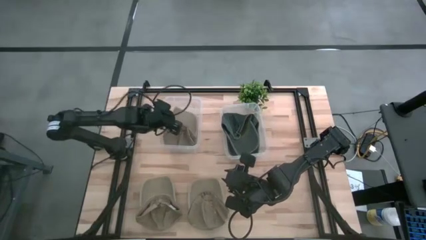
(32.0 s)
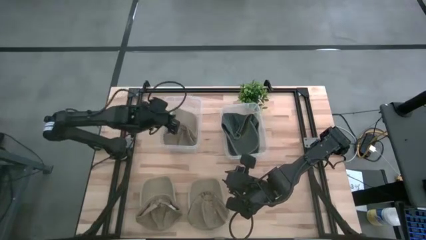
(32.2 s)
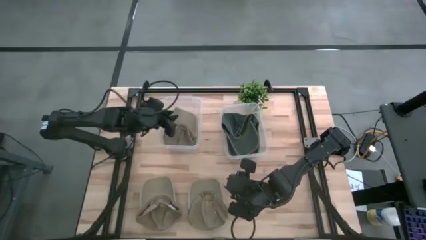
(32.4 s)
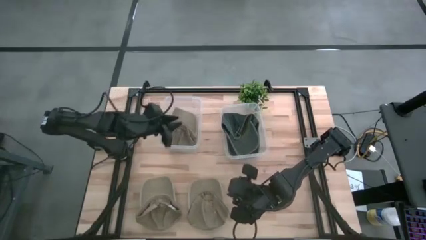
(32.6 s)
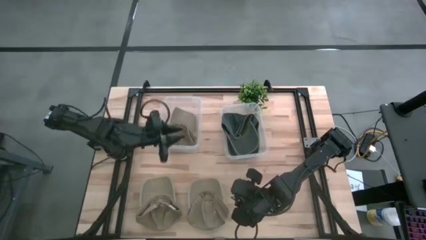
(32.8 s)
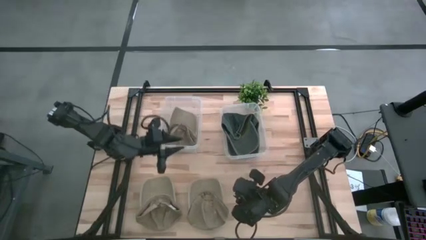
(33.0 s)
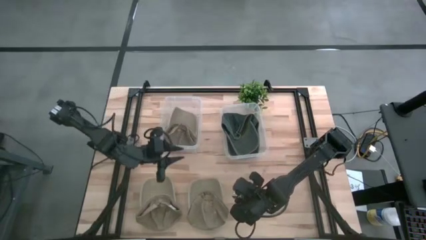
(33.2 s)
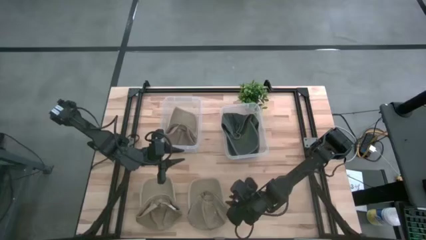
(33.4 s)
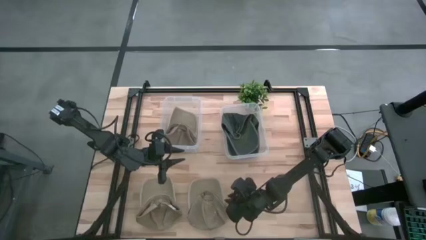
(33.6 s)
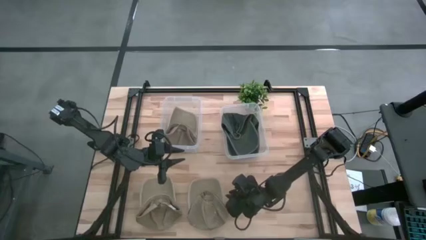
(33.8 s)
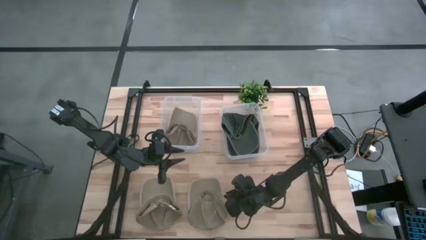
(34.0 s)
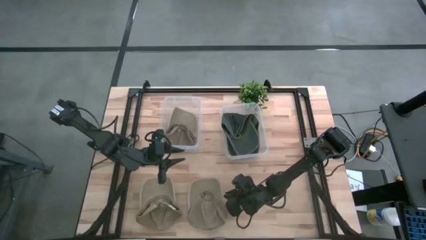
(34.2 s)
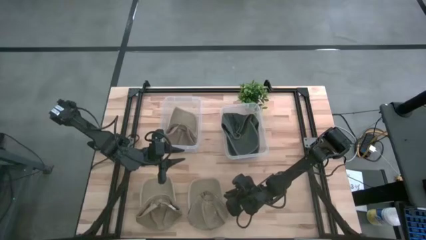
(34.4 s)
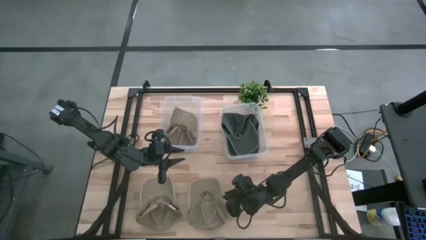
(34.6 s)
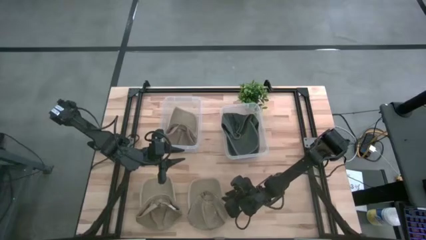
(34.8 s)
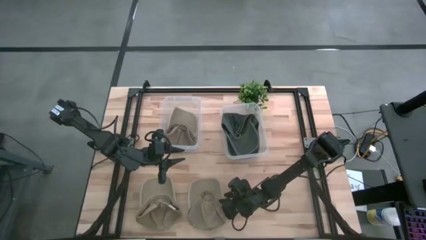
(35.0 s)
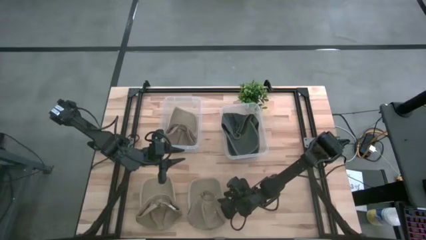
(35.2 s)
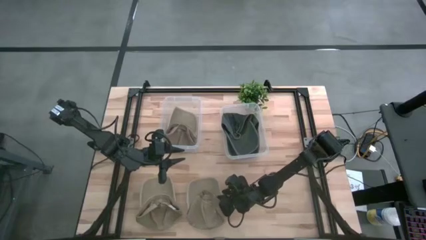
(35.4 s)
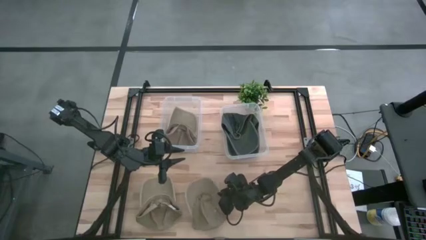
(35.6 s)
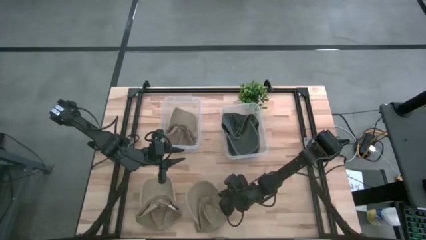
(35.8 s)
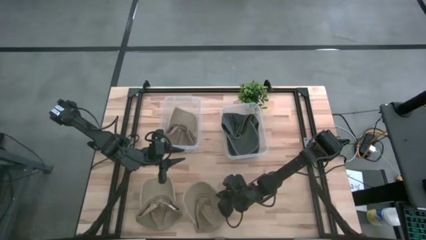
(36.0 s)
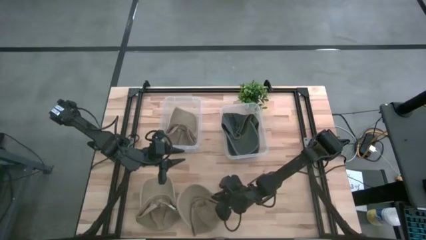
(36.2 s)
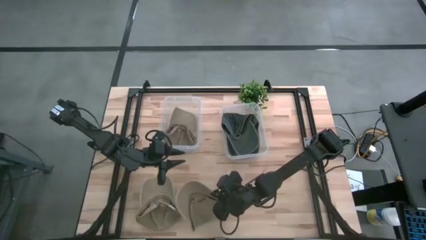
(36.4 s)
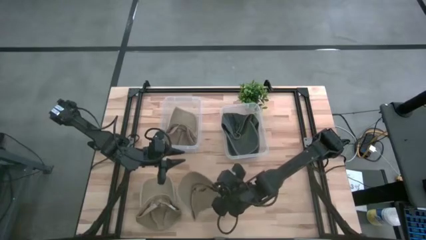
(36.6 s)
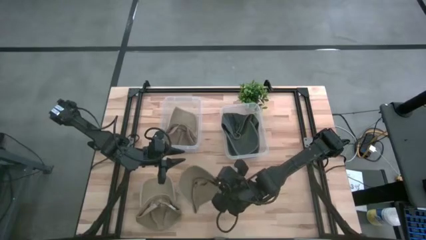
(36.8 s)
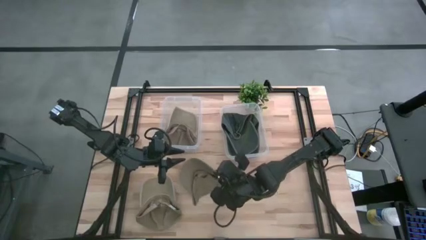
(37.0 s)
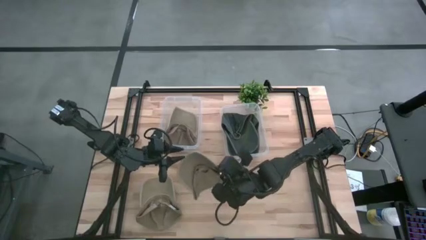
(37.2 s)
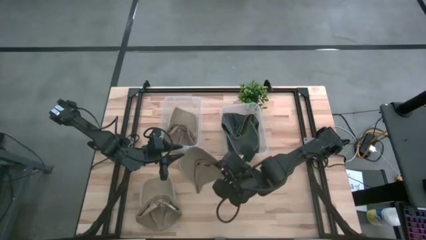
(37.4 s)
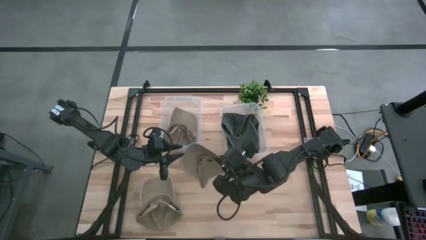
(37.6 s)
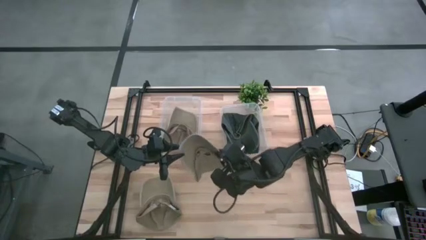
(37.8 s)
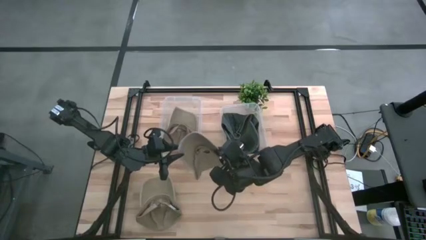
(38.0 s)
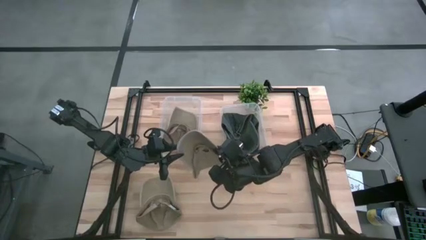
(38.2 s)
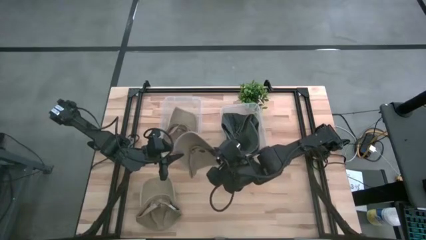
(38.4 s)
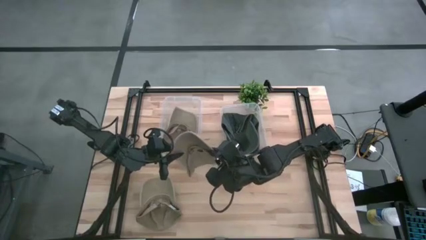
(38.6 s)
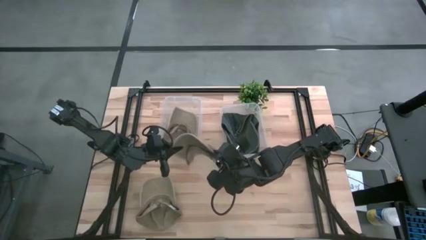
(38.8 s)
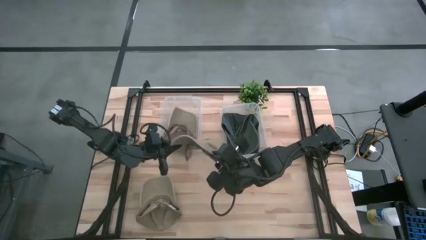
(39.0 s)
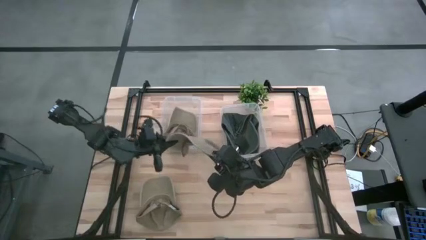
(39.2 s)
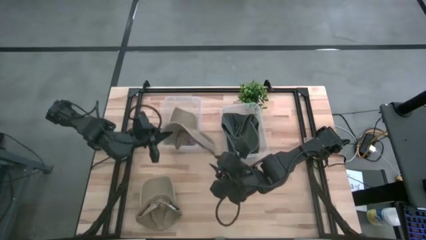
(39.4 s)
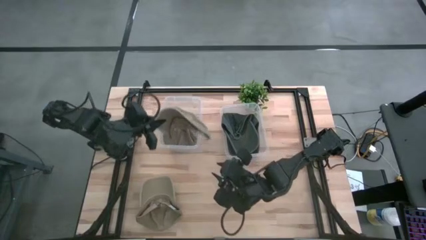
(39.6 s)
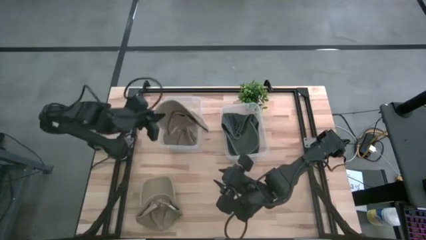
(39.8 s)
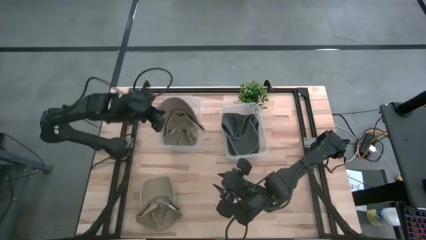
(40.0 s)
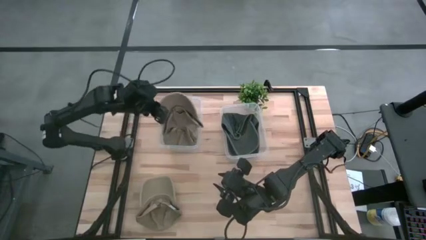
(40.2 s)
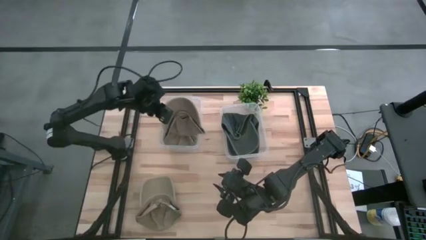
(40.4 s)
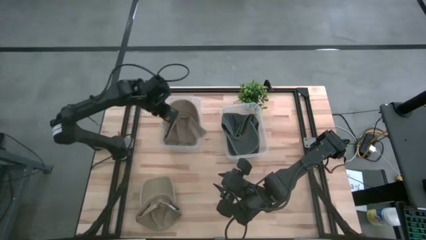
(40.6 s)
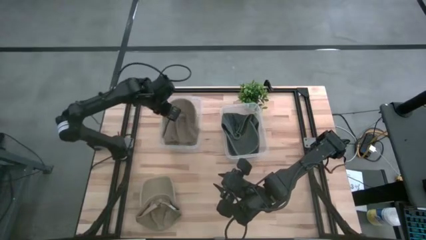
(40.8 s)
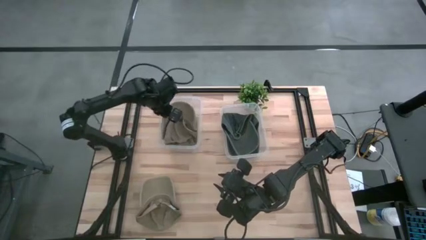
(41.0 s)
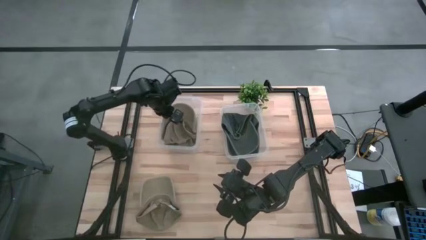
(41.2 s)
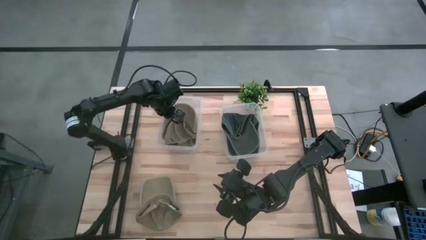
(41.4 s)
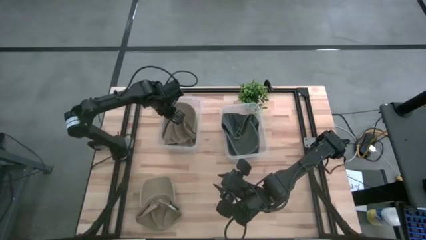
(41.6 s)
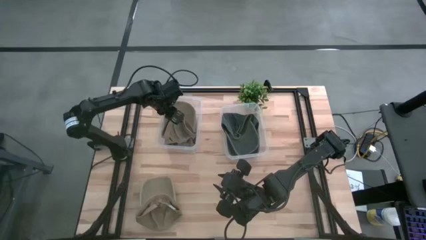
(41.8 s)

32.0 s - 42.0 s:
Task: Pick & Place hat
Put the right brown cap into the left transparent bin

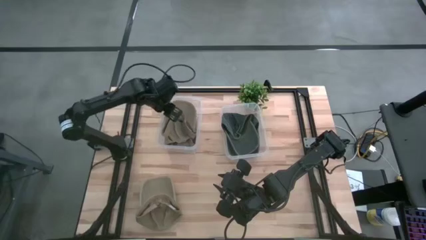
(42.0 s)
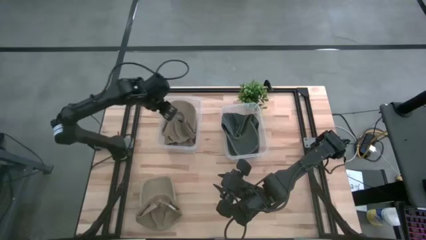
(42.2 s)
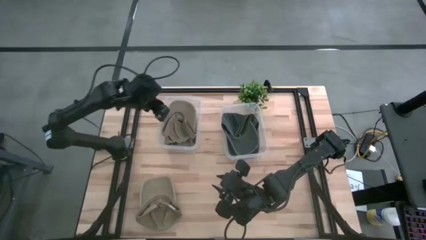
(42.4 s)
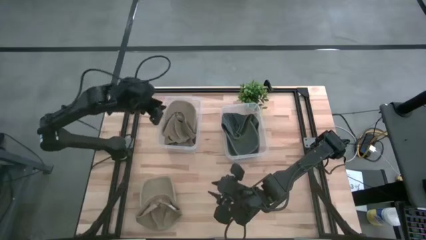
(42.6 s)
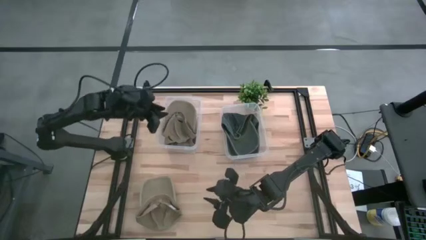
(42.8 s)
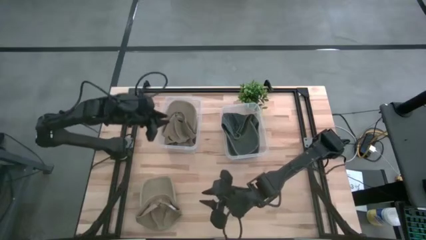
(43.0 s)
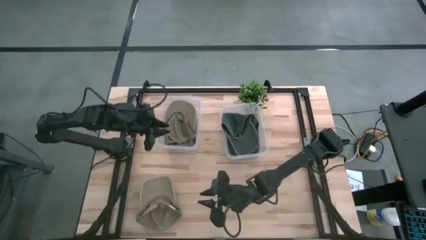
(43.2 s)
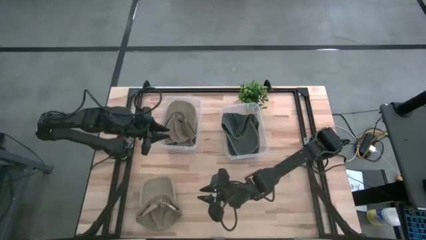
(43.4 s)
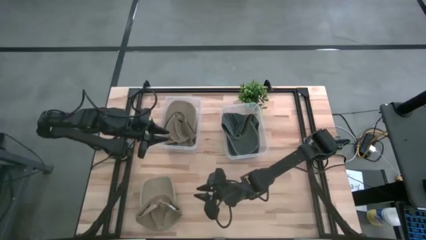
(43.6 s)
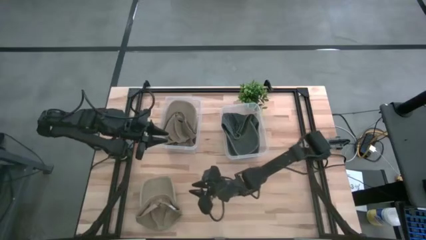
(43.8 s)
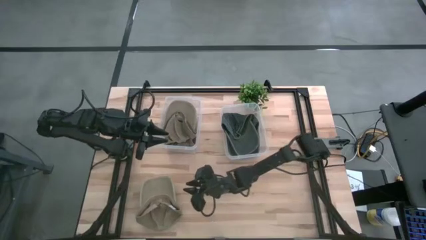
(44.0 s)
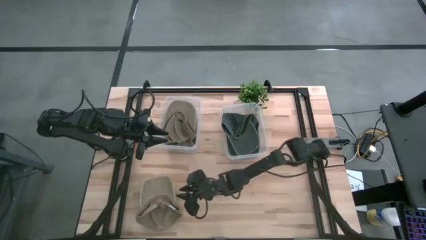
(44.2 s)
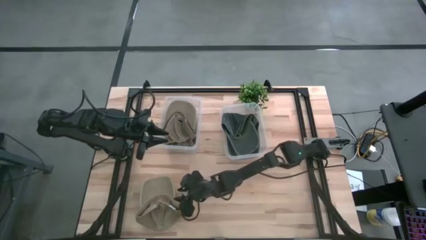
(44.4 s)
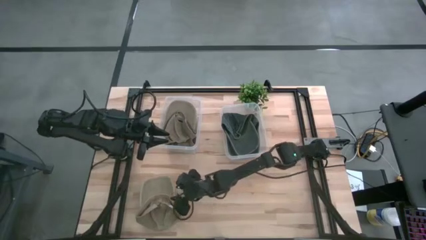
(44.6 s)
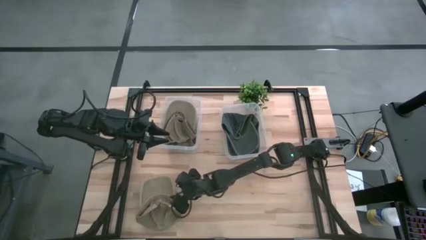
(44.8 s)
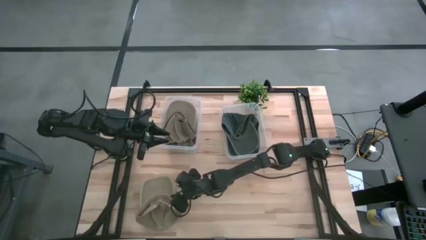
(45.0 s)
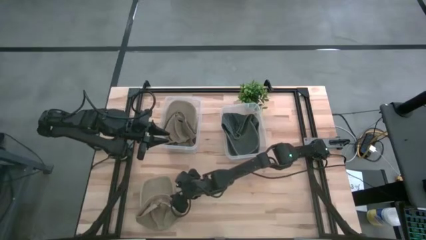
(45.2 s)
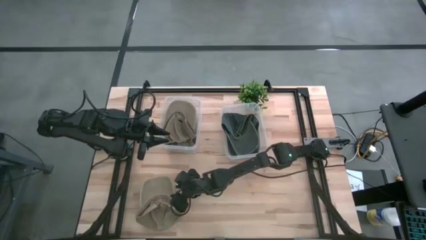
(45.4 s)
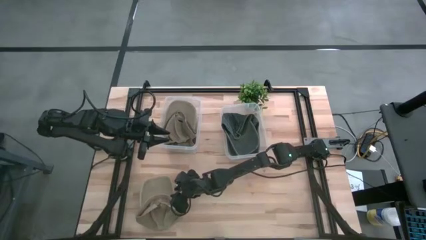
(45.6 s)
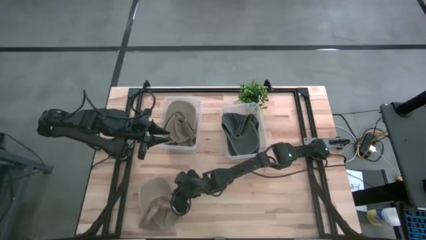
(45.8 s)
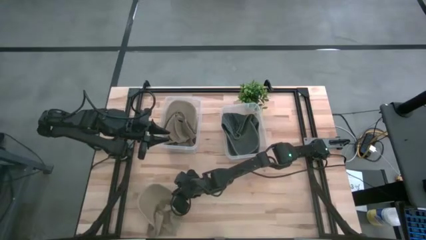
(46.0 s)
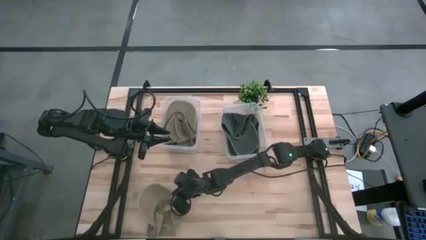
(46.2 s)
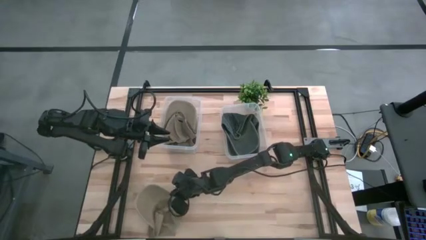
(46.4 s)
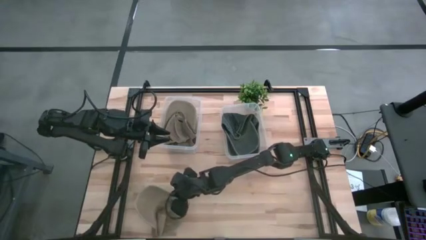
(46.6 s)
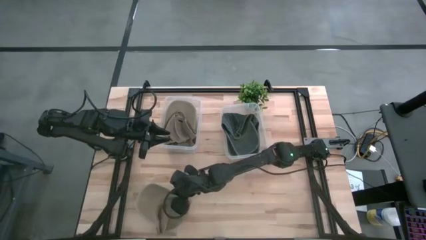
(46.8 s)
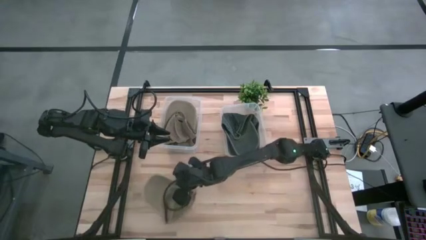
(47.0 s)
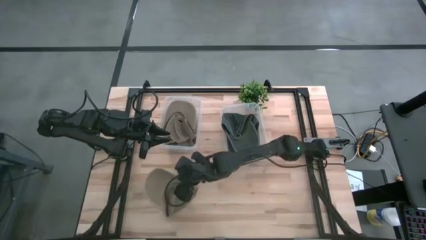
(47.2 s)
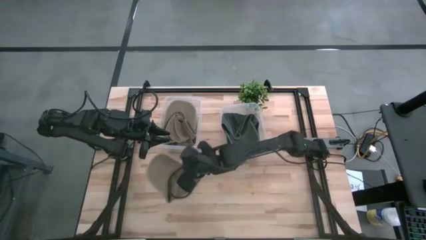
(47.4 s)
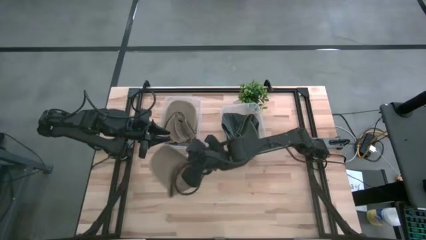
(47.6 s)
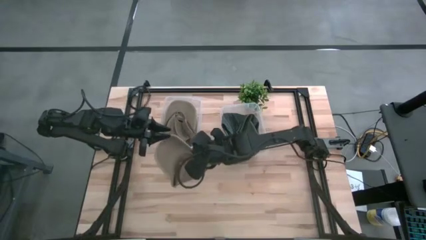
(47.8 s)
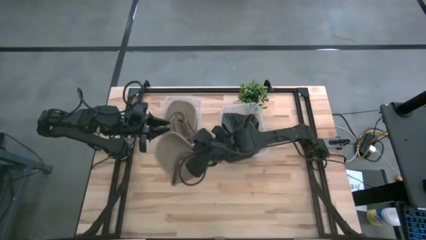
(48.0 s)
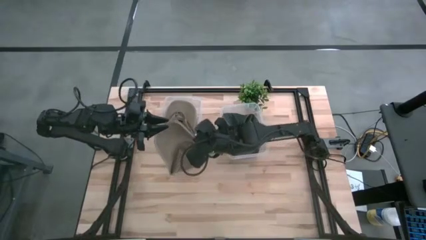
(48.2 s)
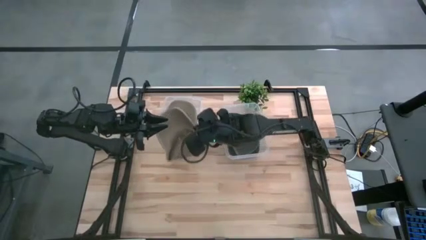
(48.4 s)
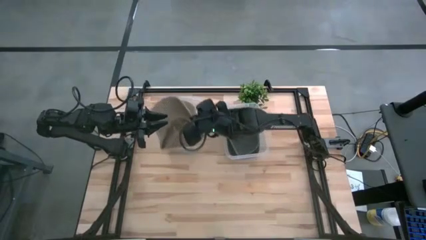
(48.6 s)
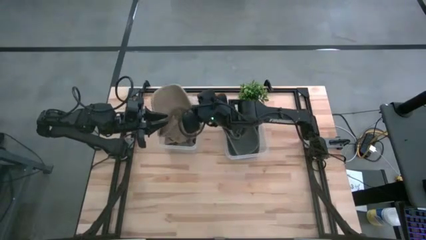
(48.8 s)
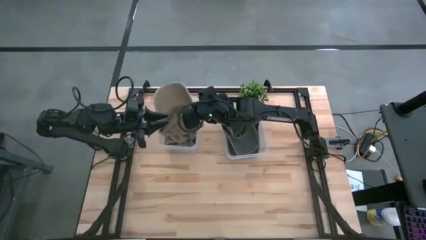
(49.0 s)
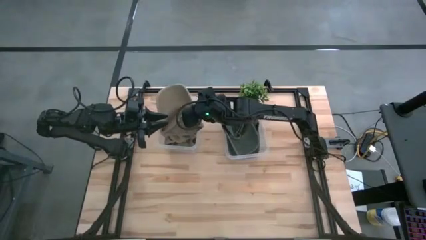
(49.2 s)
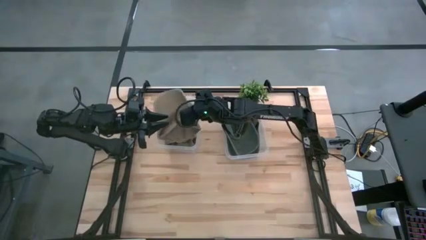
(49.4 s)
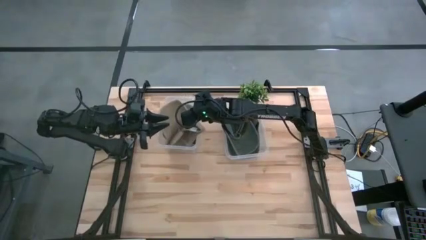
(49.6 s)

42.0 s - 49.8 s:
Put the brown cap into the left transparent bin
